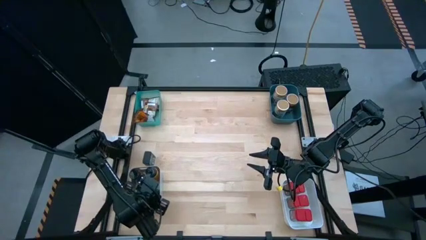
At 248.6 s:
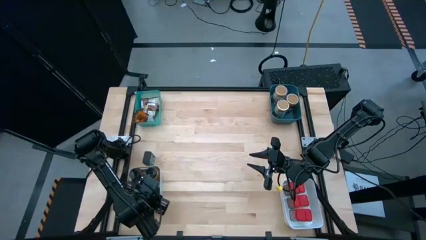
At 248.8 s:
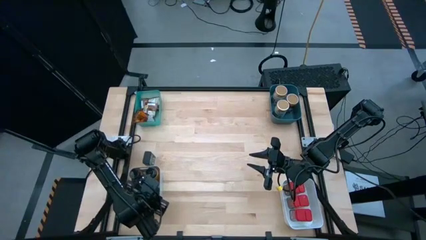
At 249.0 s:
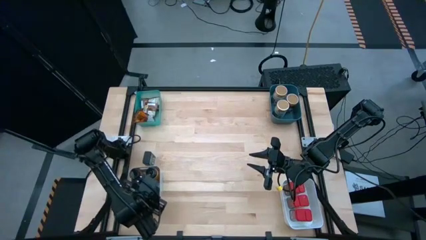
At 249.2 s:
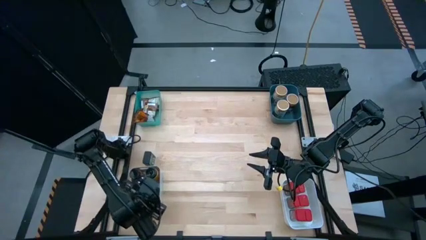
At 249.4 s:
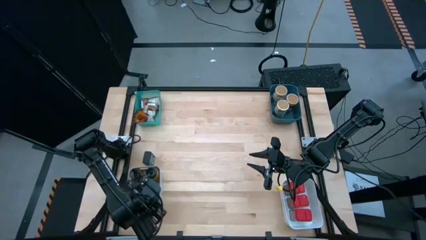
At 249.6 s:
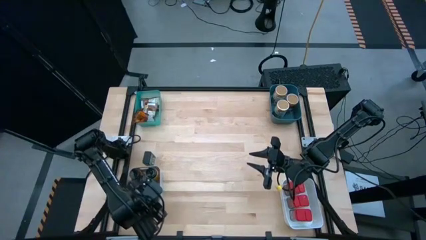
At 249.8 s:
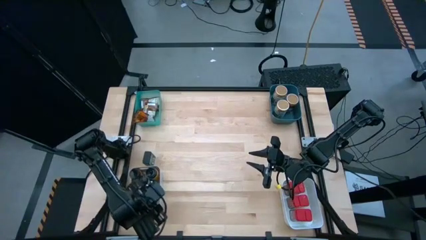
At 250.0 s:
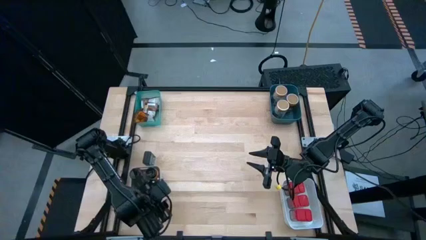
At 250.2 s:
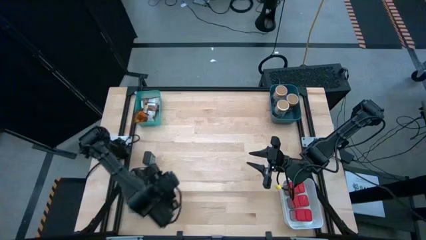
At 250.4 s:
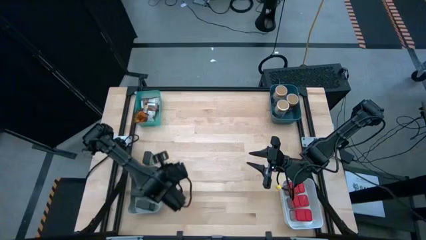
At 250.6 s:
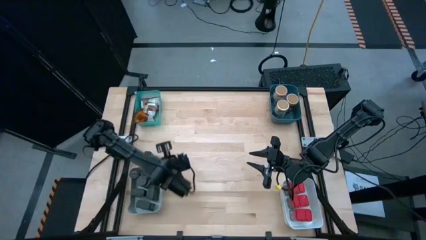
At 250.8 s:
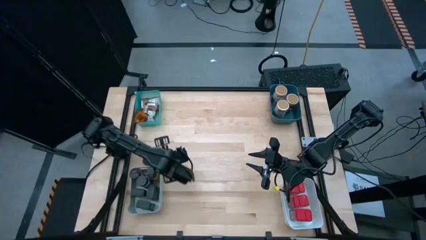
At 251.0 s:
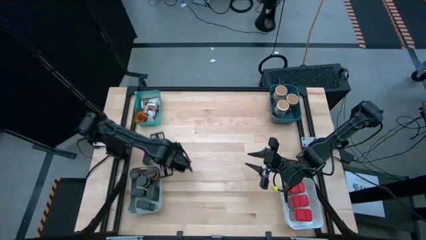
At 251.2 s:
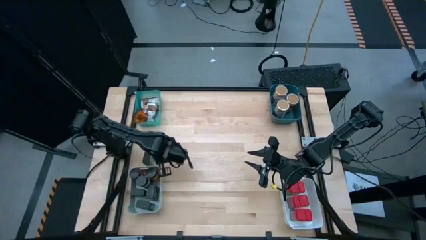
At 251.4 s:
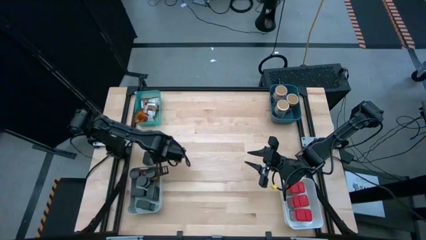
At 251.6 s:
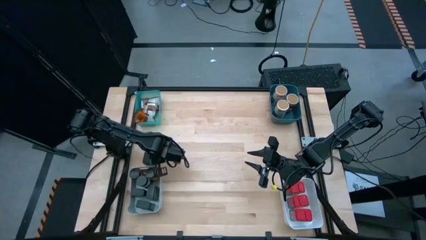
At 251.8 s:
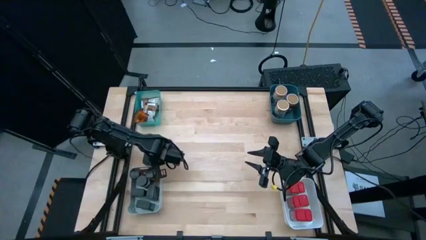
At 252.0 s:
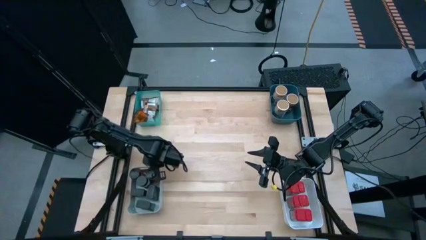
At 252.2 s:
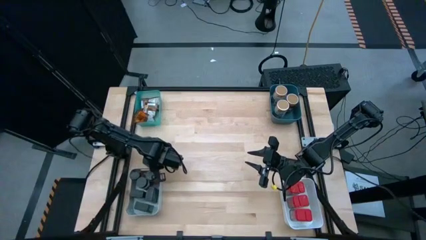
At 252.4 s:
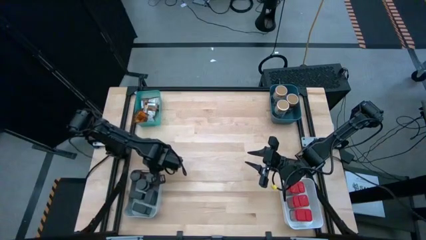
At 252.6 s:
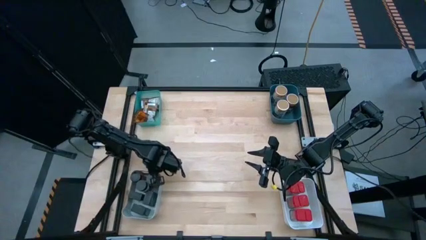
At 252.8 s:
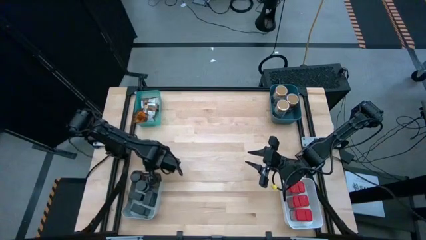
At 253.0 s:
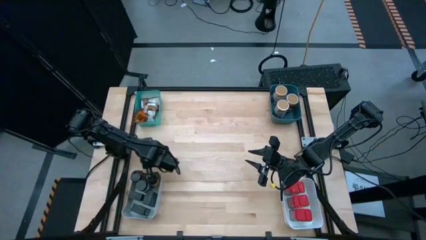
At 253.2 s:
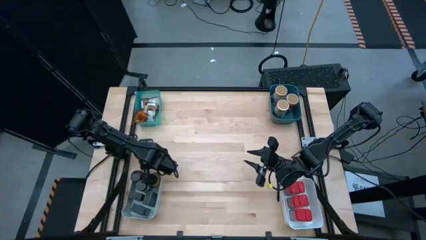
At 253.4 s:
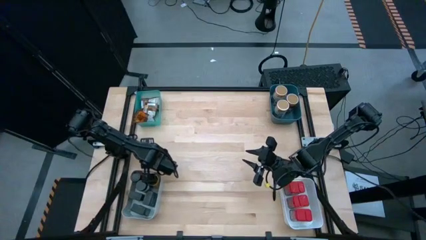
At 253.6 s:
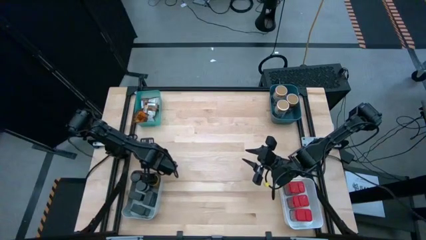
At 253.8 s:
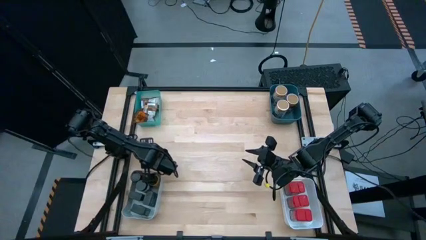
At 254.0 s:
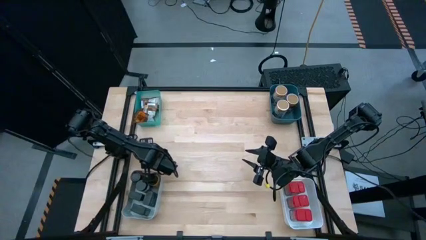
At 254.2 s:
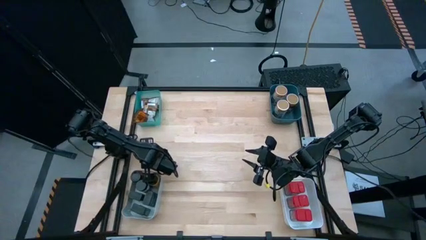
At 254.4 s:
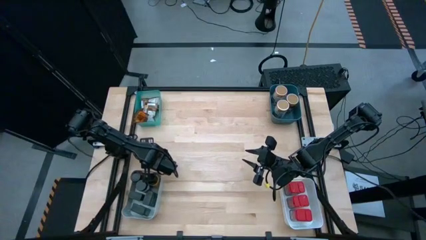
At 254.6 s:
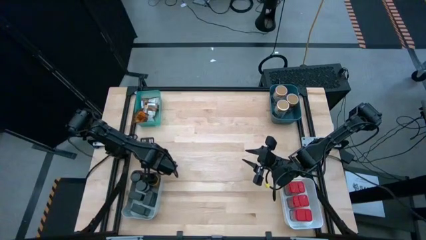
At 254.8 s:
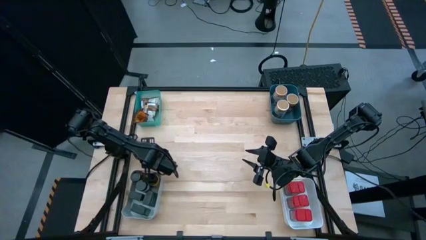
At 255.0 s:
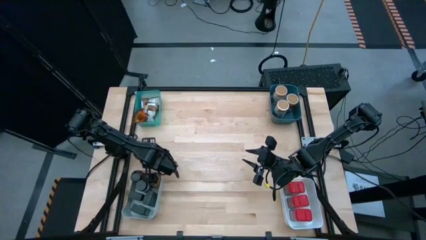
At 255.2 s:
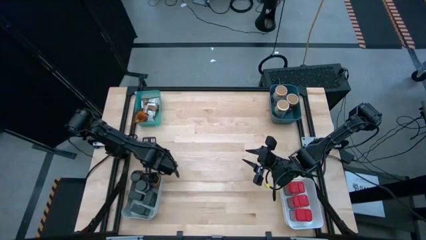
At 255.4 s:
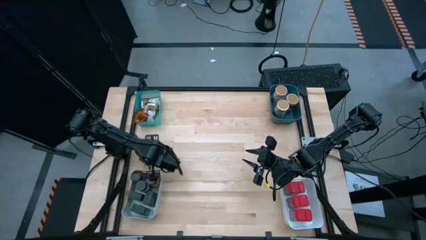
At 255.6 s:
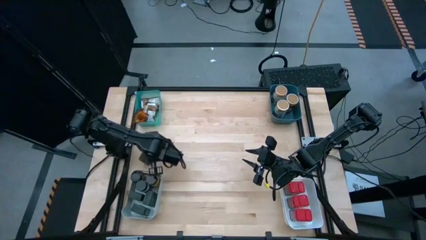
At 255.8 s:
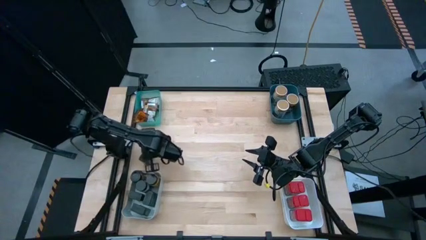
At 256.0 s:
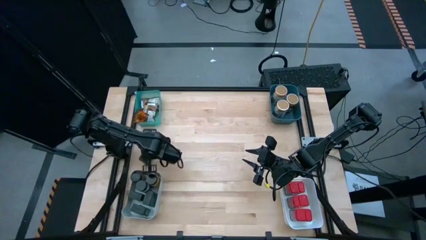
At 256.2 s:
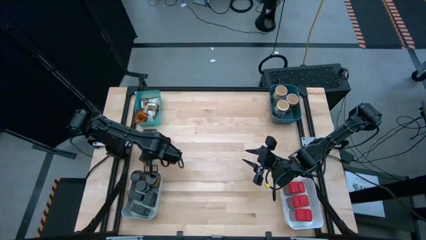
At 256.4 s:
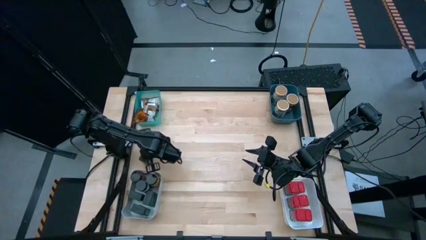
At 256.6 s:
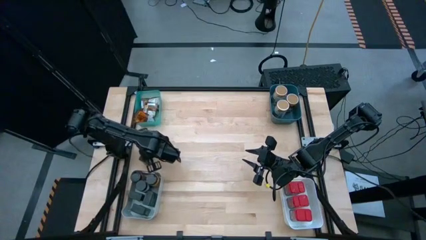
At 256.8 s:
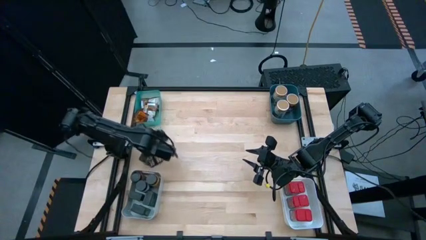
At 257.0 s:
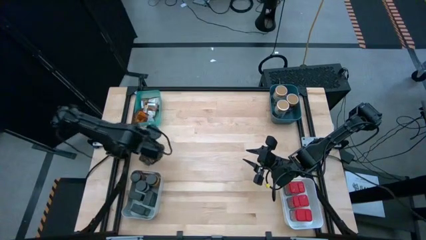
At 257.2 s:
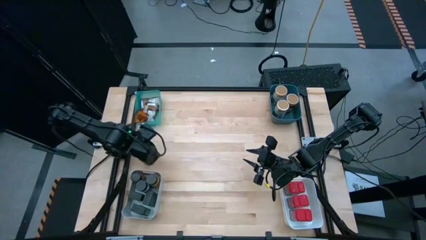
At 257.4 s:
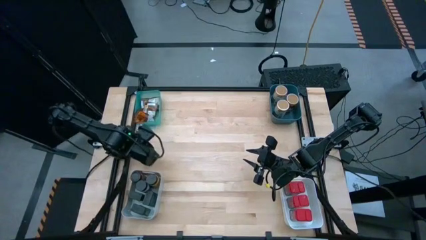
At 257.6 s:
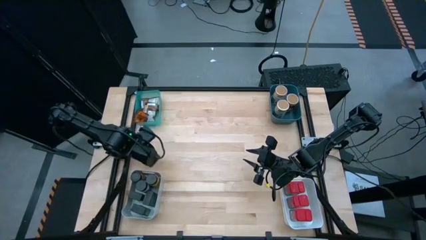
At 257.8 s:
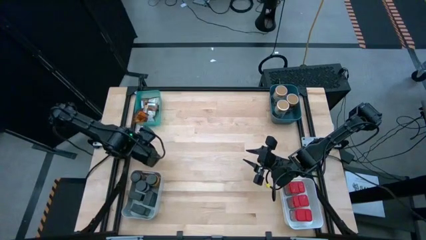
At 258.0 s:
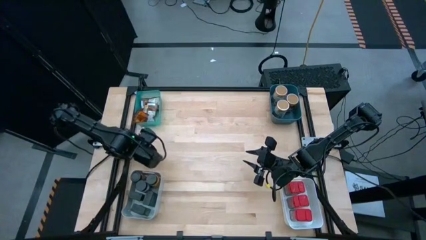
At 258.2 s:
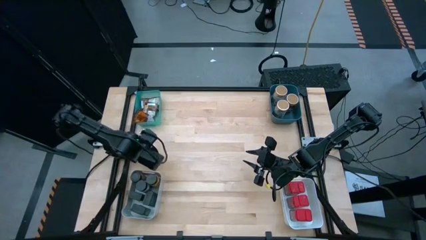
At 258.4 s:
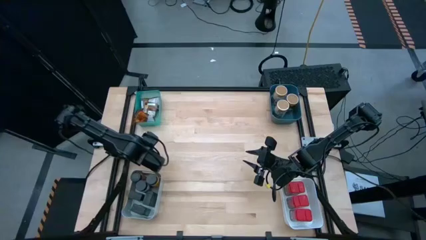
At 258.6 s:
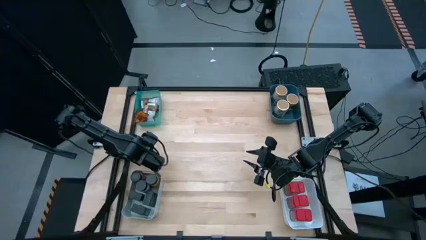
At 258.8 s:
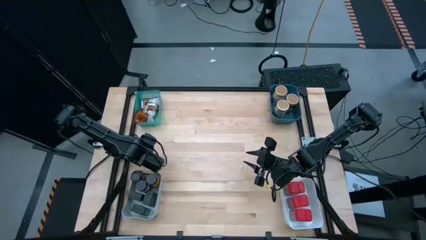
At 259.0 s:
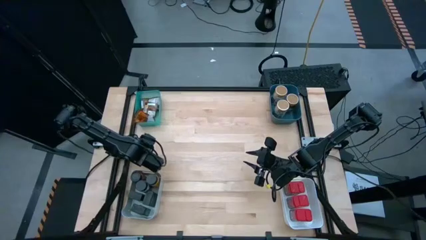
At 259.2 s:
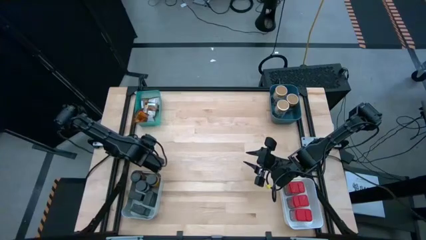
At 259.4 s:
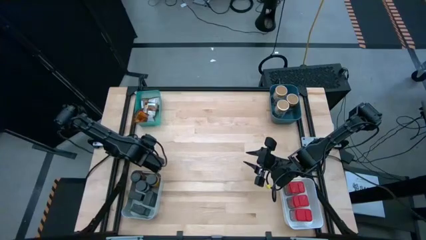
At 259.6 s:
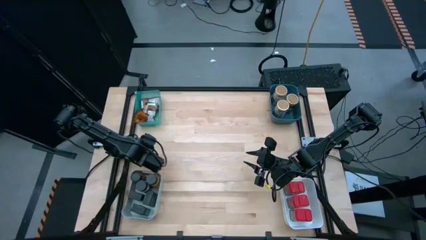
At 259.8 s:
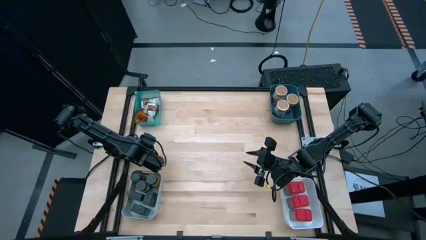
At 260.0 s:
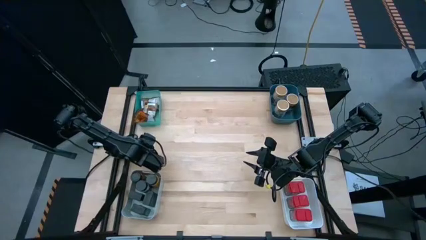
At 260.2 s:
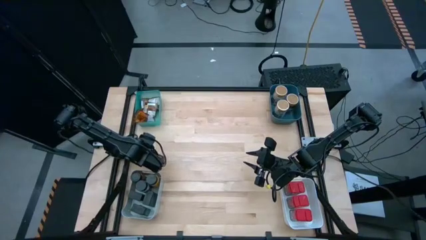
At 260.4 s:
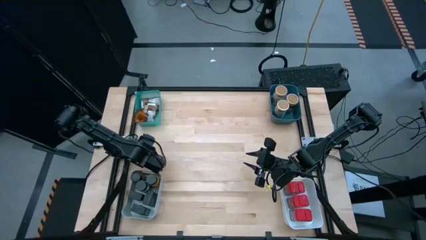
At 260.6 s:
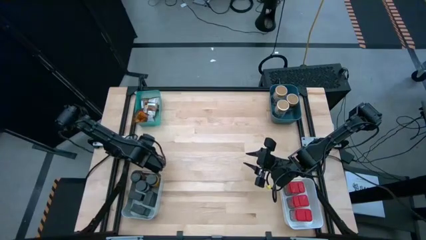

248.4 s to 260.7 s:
Task: Sort spices by type
Put the black seasoning can into the gray bin
